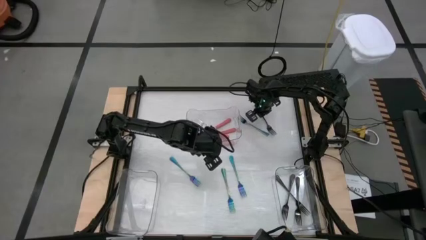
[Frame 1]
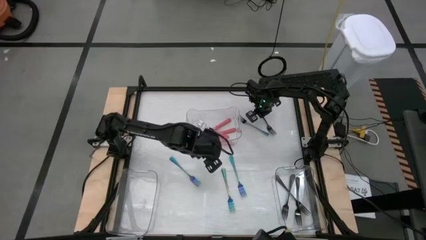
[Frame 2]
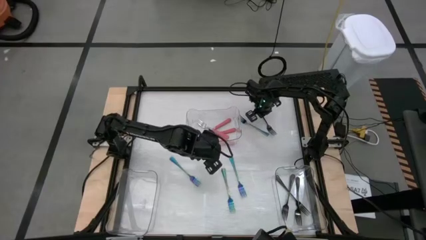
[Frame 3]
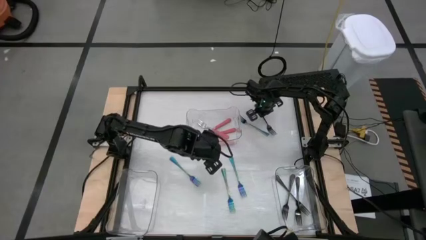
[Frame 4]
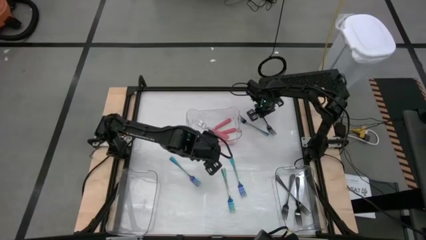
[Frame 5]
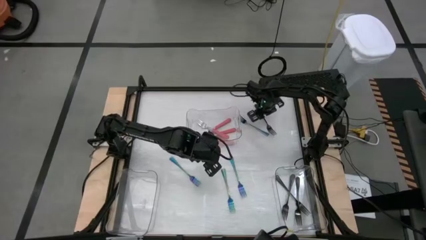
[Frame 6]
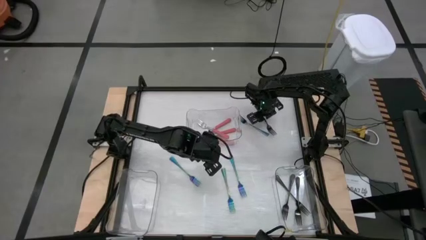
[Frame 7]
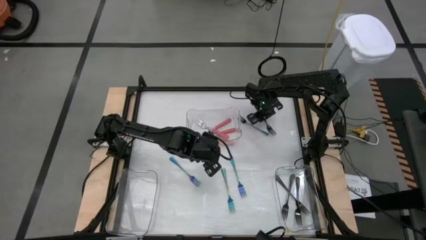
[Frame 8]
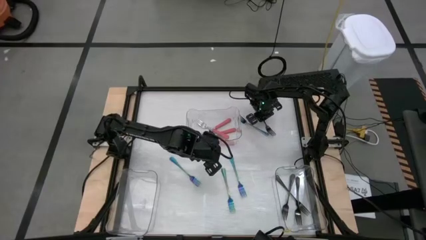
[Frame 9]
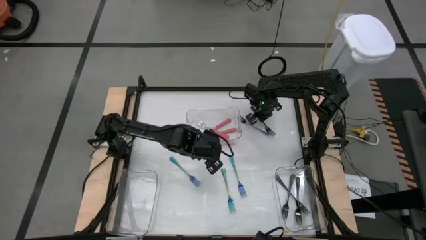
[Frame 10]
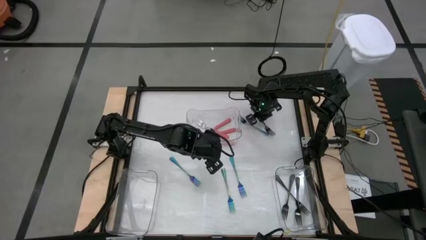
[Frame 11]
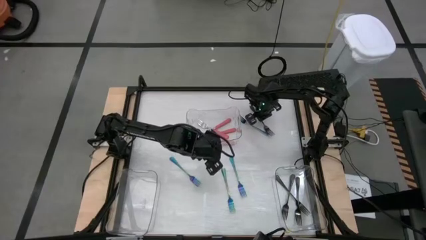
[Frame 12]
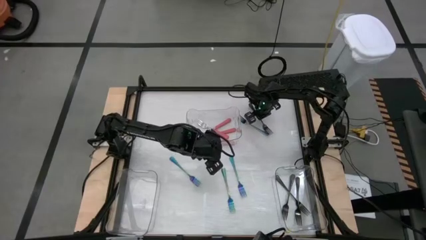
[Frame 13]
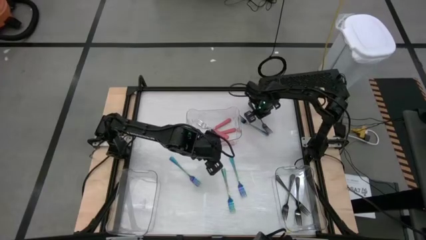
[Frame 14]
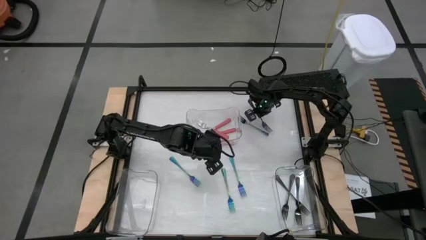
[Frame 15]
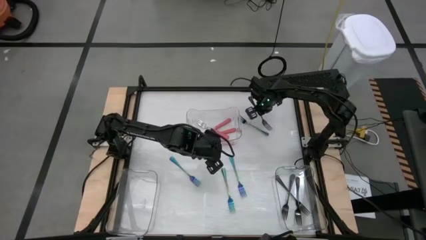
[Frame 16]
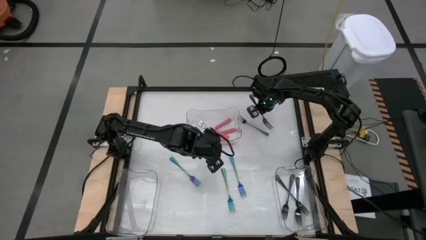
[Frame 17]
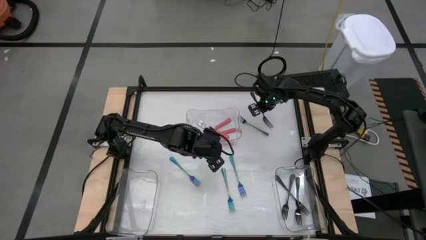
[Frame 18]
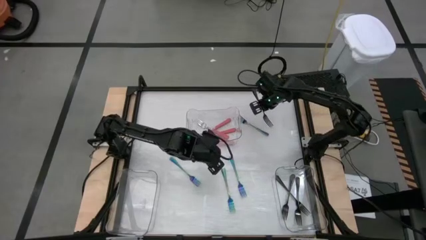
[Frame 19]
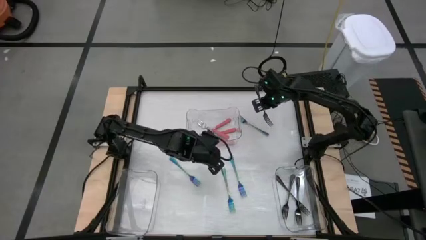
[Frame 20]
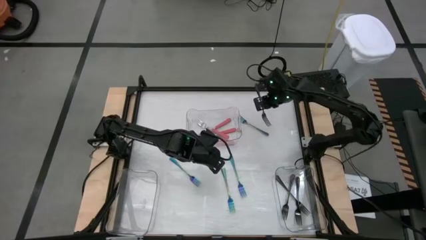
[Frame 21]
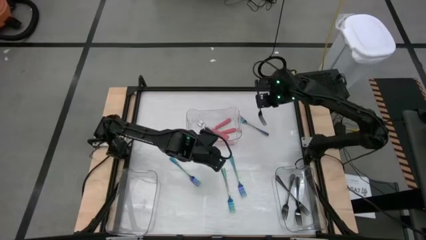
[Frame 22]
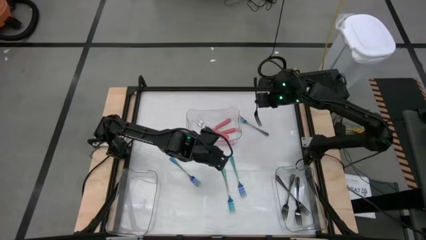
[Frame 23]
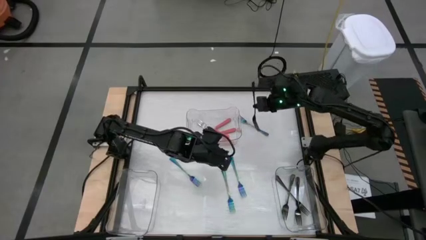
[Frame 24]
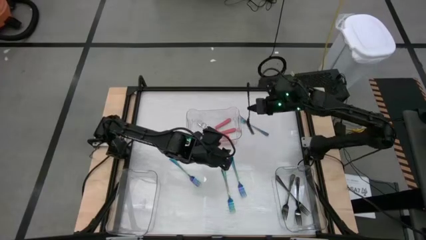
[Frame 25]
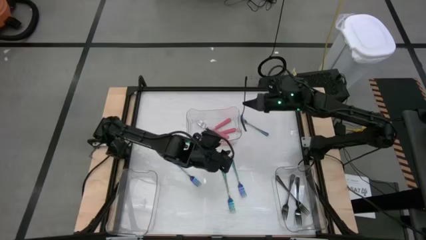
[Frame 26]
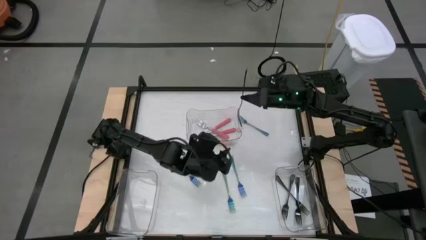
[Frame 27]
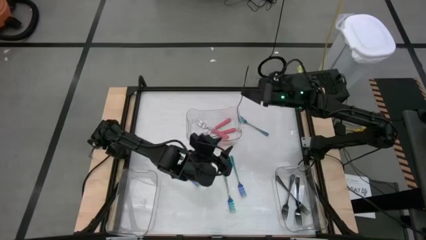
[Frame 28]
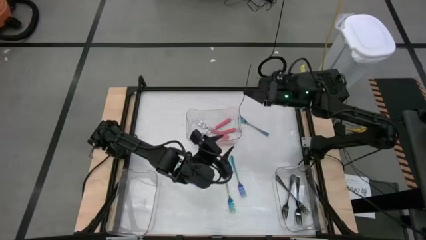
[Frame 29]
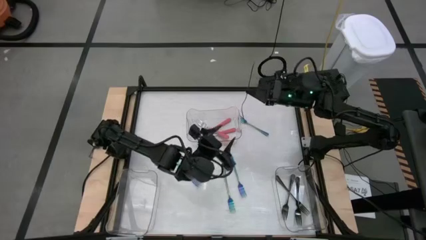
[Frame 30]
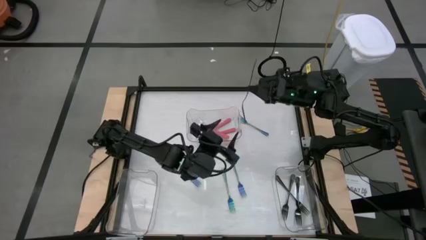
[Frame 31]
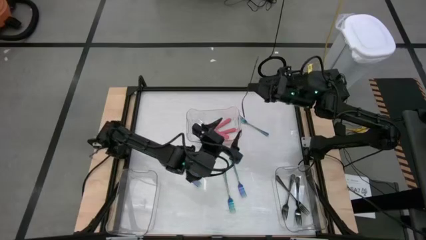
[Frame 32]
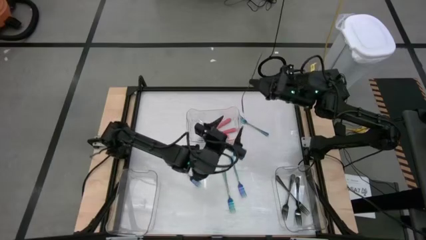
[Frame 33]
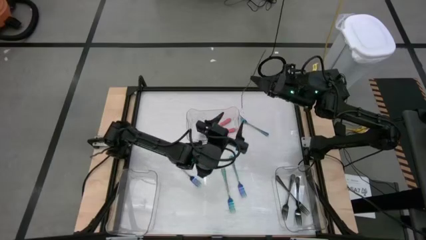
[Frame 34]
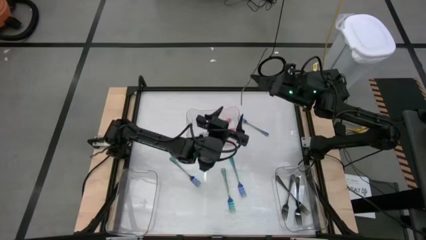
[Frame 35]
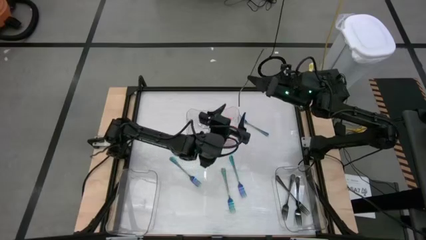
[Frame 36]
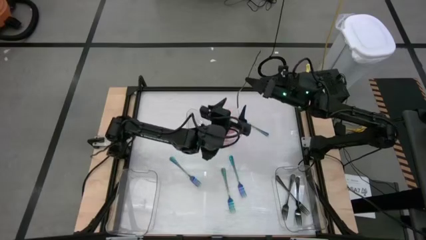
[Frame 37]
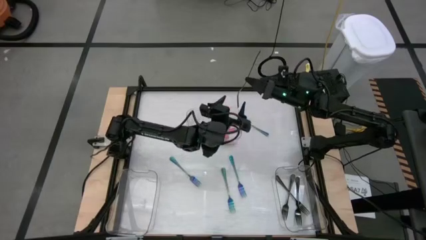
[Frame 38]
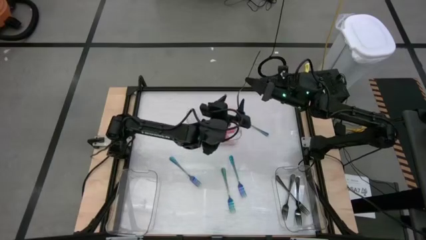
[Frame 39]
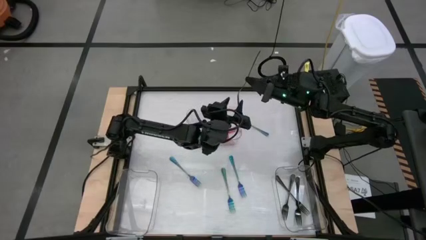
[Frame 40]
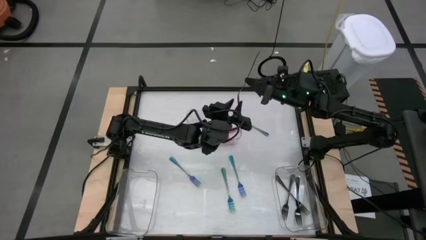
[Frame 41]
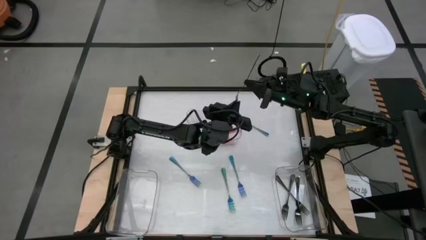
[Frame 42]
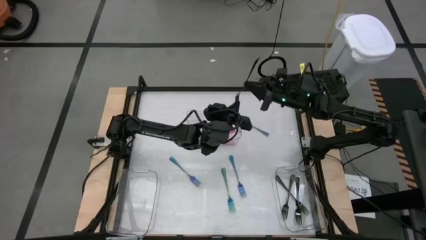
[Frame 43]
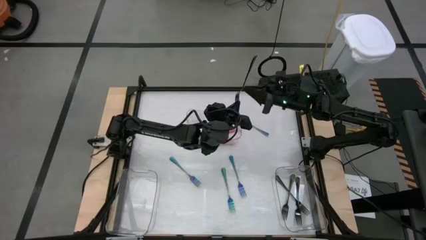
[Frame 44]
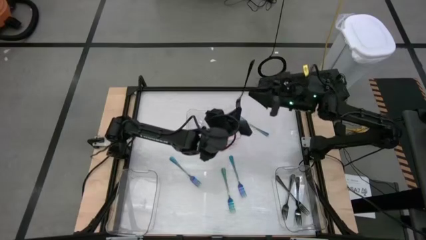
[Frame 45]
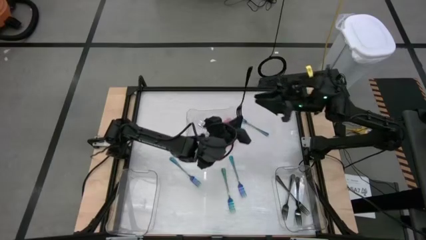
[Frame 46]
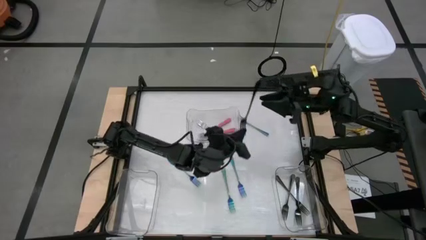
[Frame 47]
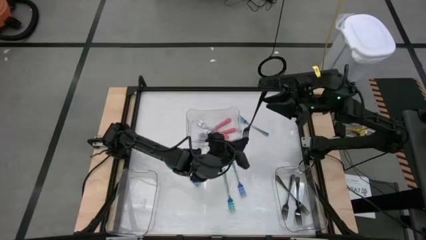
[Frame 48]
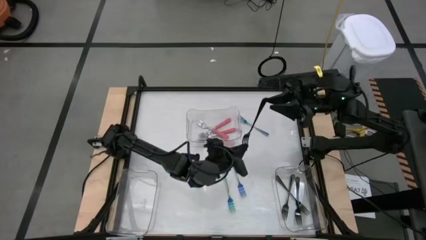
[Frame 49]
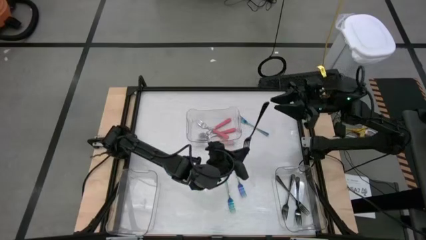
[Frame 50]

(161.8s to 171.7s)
Task: Sort silverware by color (type)
Put the black fork into the right transparent bin

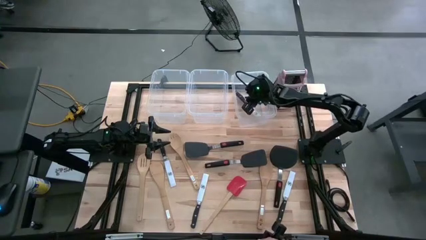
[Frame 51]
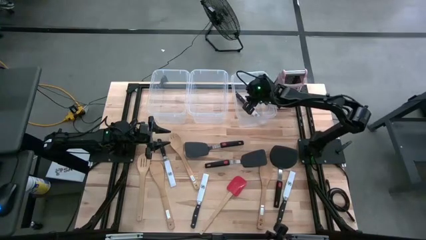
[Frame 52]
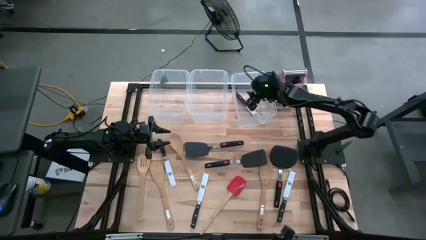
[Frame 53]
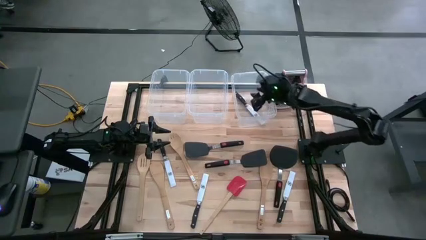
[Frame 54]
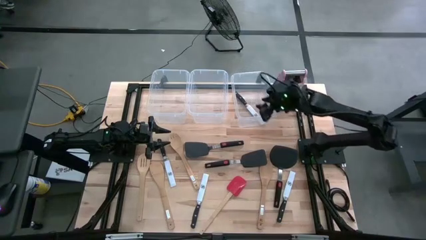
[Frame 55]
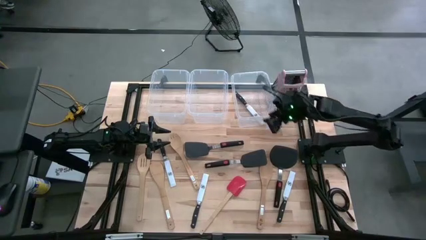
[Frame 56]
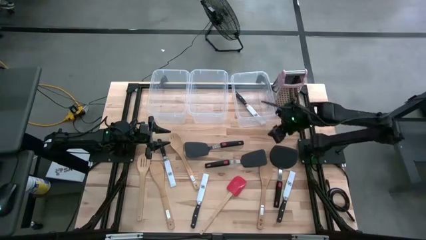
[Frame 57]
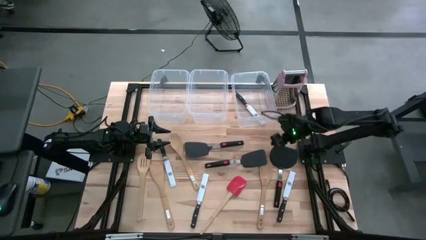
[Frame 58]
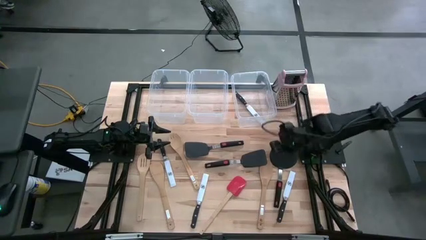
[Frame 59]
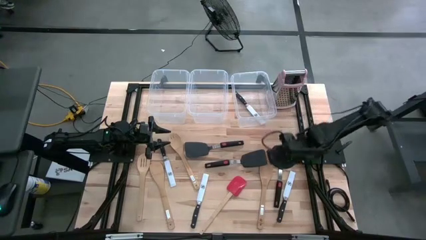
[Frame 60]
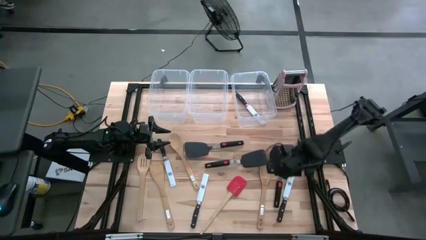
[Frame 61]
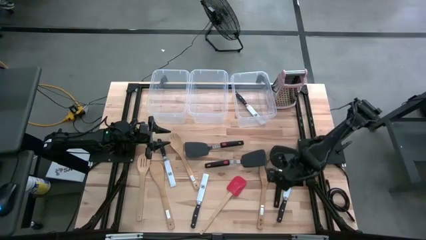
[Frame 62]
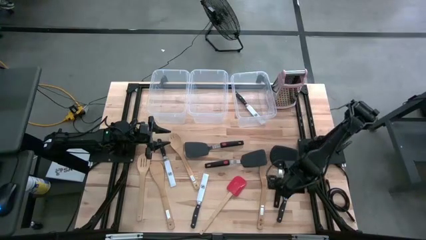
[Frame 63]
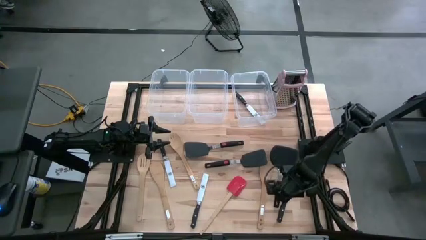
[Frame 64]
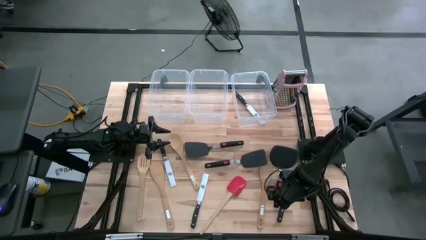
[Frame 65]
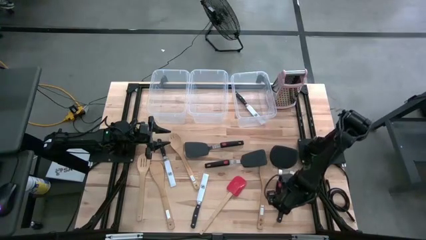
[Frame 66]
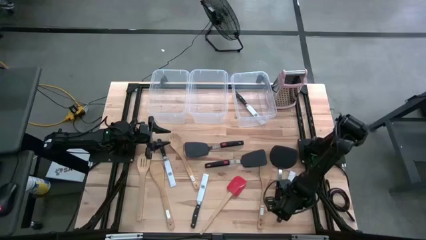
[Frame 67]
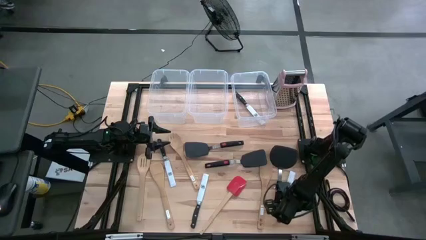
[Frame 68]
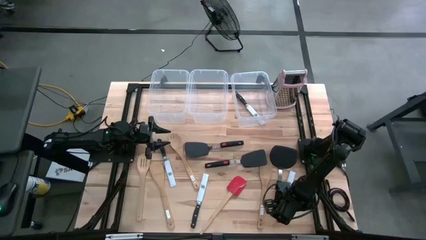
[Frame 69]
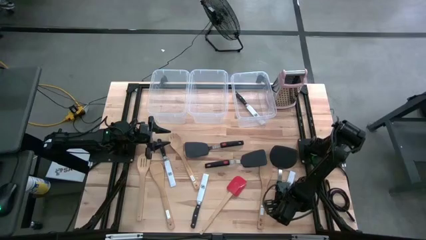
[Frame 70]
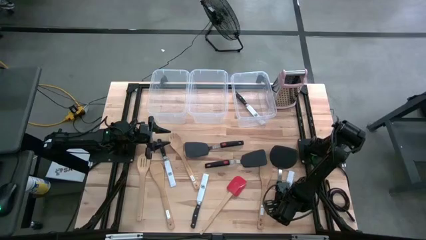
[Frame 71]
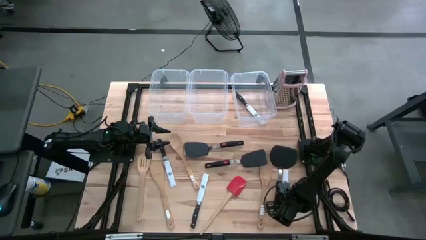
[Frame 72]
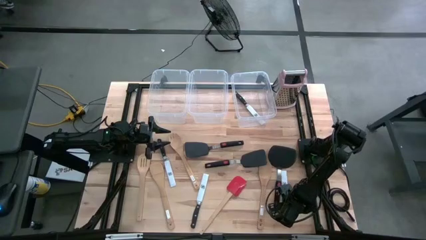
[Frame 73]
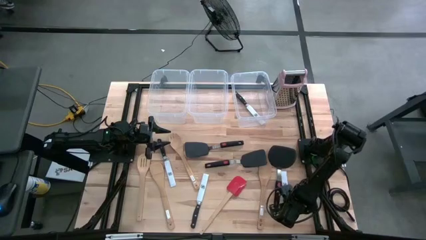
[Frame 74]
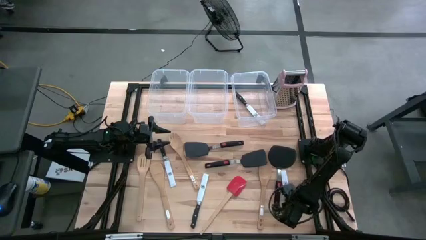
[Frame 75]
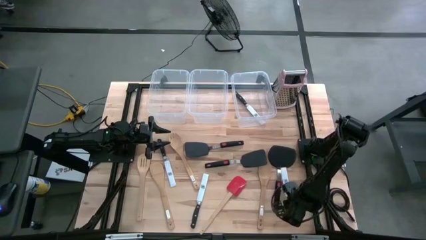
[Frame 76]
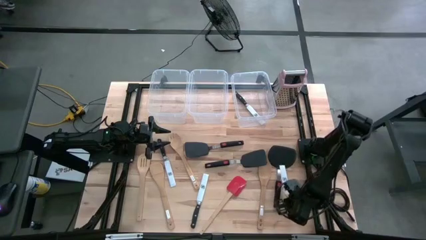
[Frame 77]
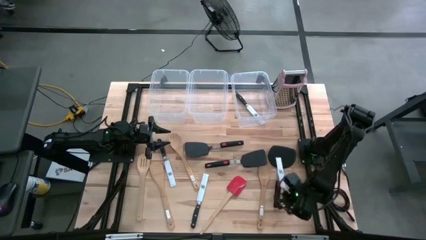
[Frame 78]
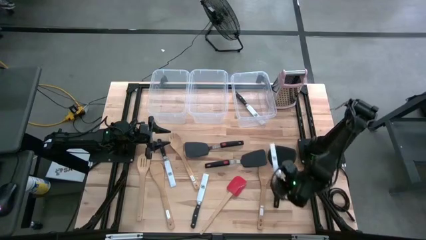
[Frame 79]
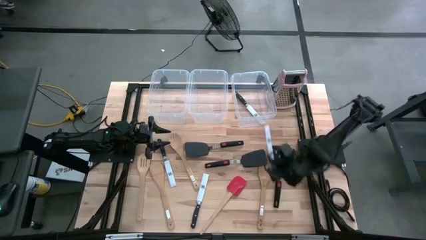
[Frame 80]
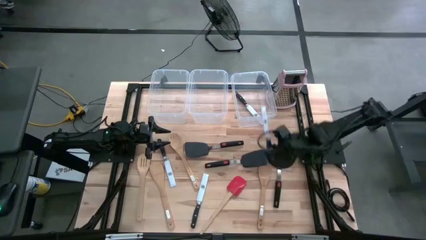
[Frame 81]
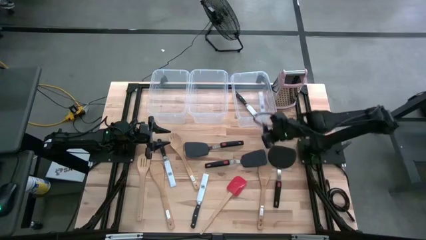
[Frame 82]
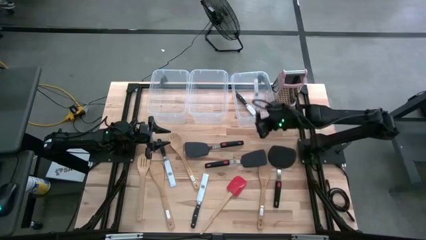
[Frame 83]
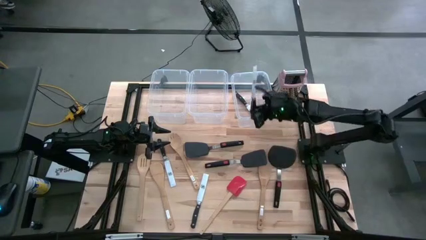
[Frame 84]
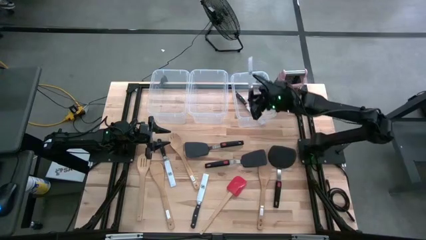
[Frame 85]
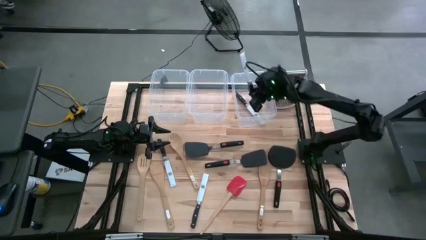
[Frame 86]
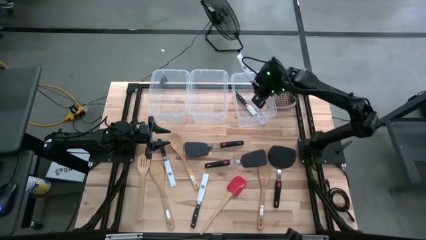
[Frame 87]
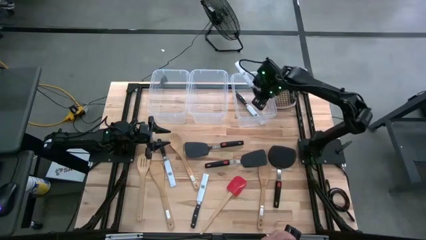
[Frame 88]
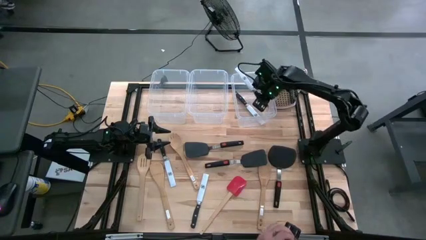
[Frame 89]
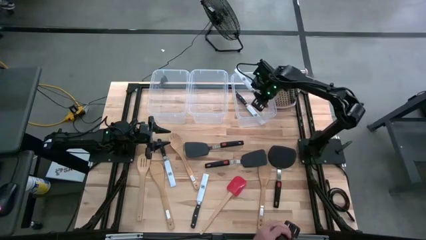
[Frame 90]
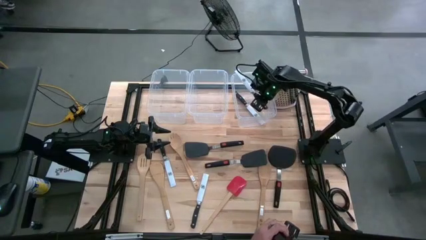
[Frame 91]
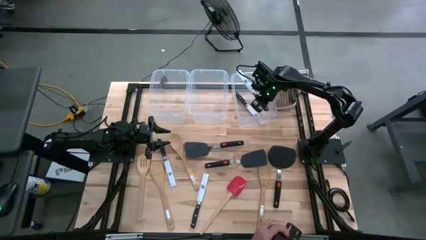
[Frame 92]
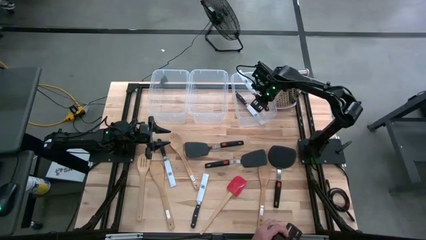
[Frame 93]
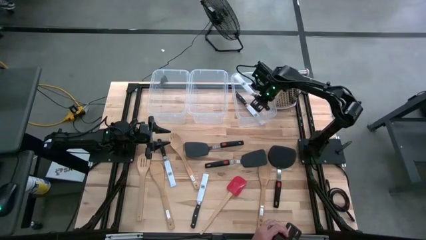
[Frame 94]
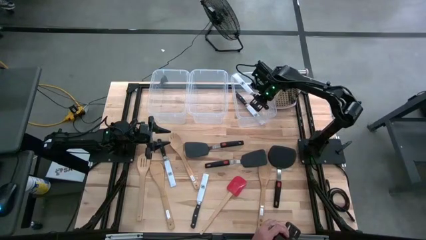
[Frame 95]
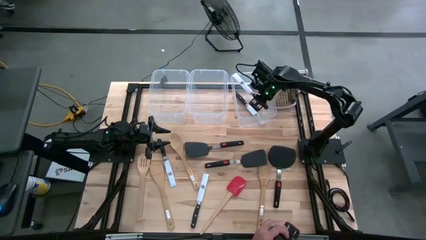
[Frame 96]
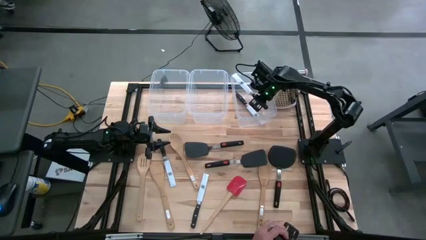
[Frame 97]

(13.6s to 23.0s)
Task: Pick & Place Kitchen Items
Put the black knife into the right bin
